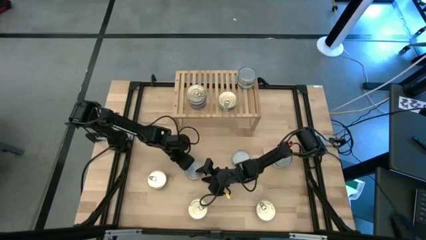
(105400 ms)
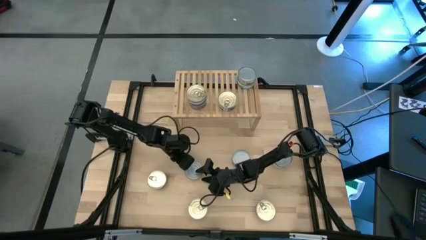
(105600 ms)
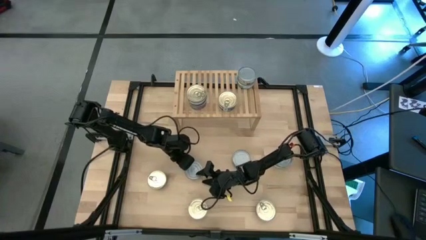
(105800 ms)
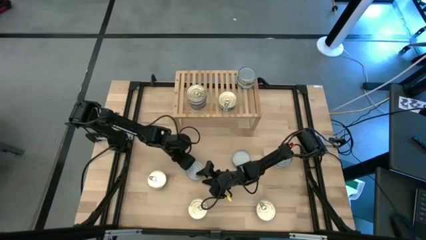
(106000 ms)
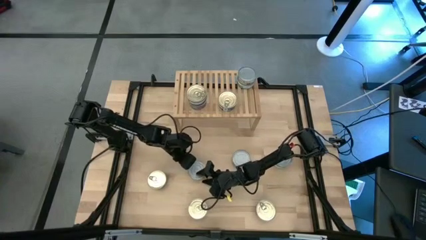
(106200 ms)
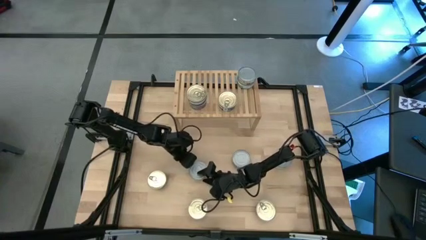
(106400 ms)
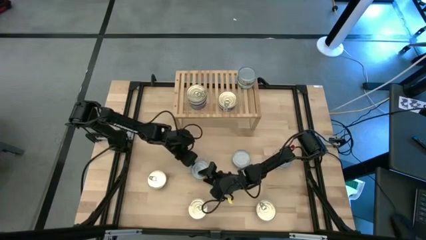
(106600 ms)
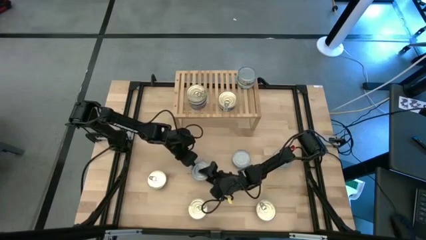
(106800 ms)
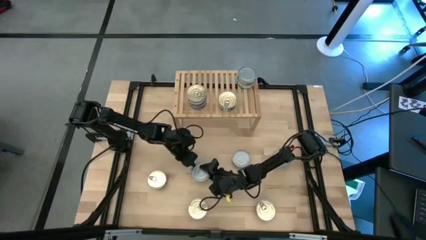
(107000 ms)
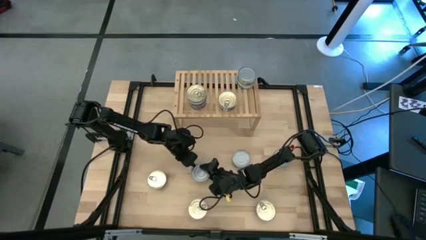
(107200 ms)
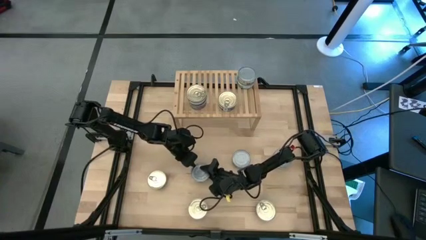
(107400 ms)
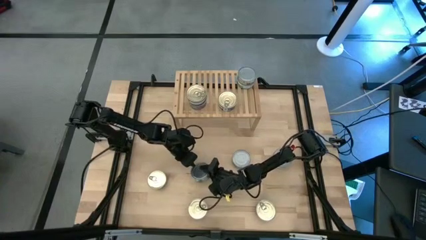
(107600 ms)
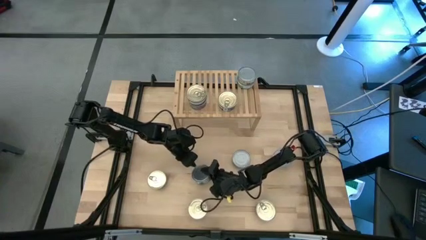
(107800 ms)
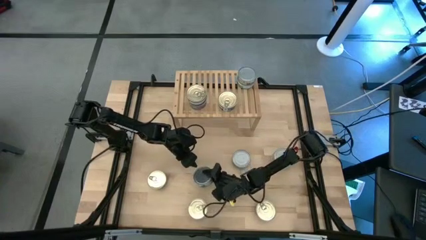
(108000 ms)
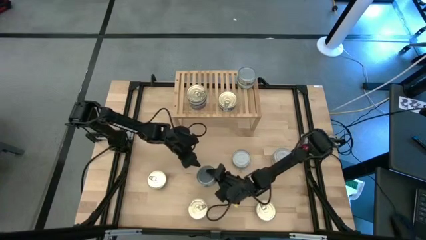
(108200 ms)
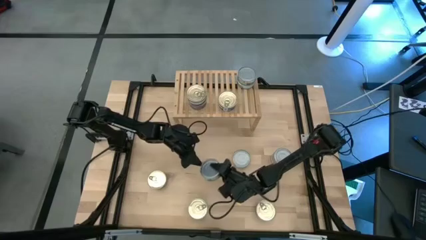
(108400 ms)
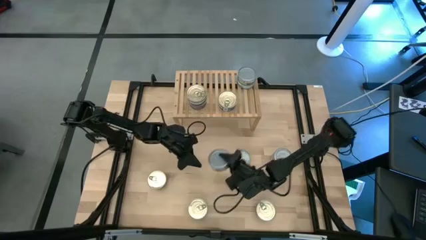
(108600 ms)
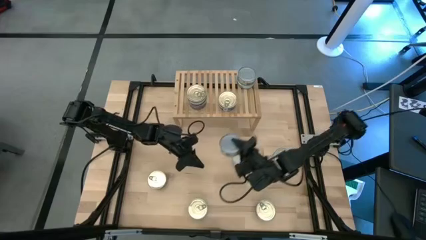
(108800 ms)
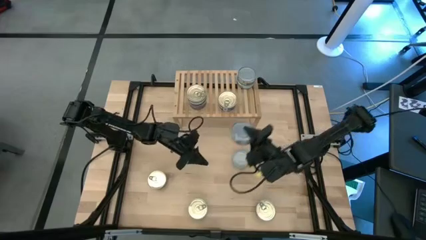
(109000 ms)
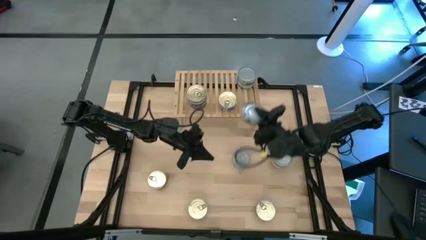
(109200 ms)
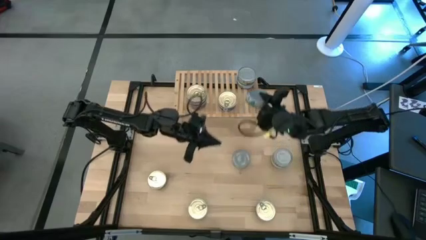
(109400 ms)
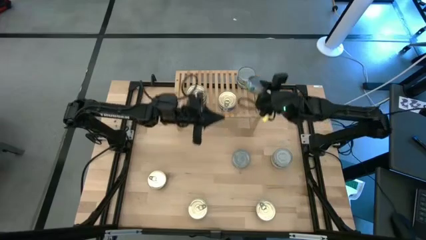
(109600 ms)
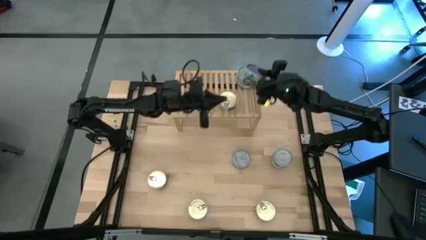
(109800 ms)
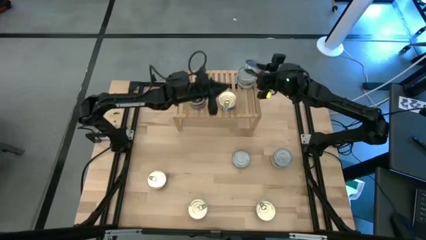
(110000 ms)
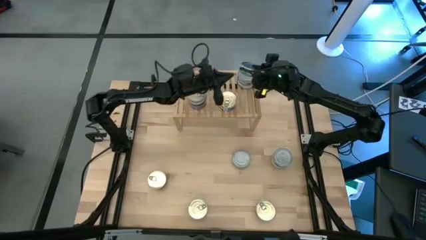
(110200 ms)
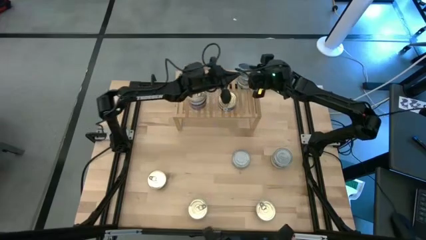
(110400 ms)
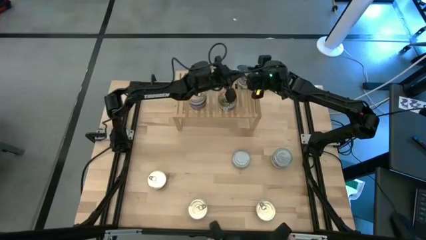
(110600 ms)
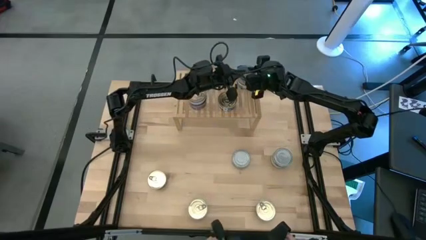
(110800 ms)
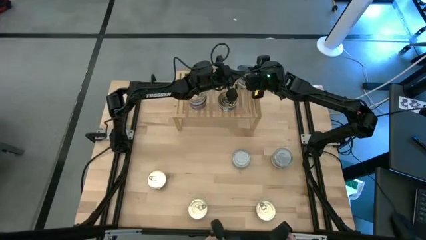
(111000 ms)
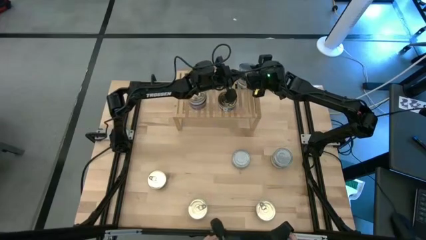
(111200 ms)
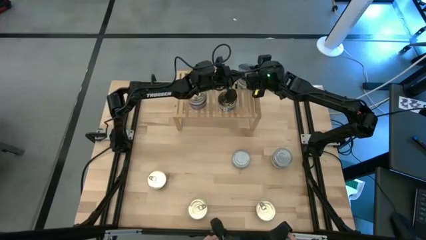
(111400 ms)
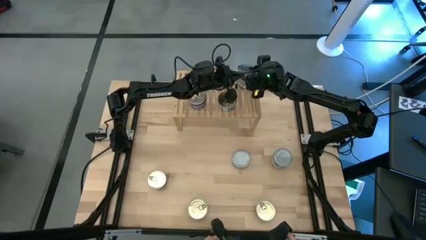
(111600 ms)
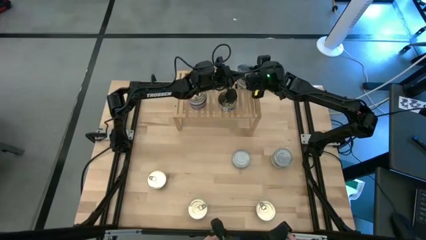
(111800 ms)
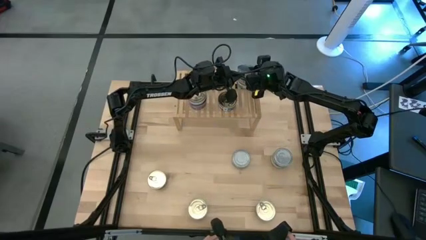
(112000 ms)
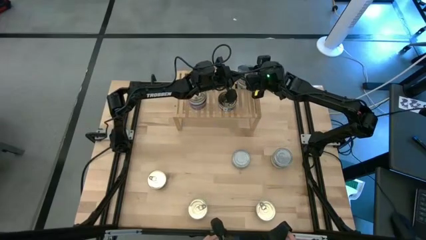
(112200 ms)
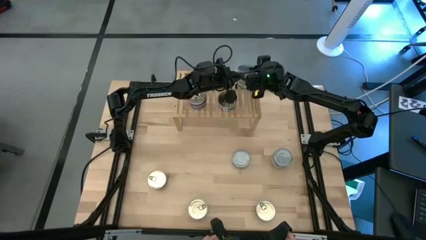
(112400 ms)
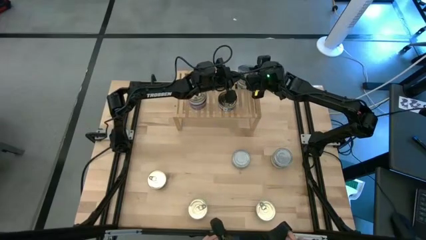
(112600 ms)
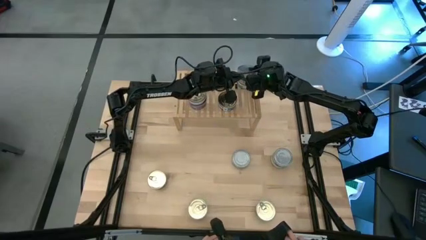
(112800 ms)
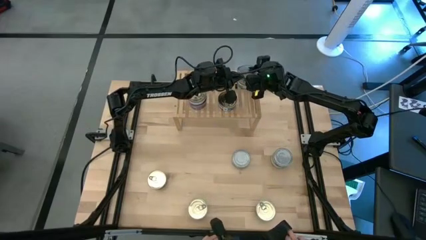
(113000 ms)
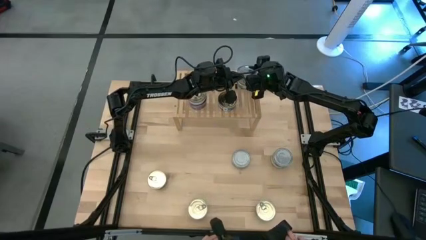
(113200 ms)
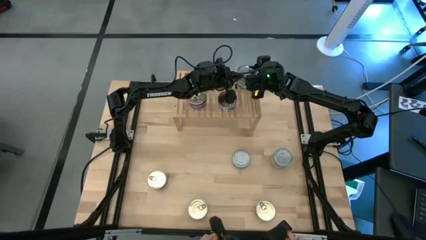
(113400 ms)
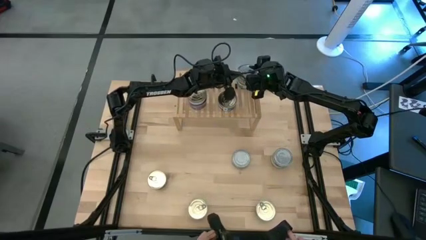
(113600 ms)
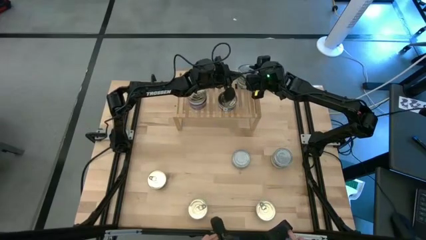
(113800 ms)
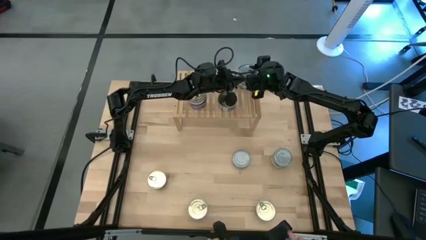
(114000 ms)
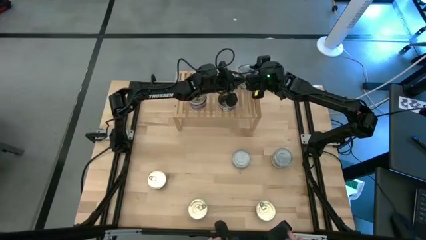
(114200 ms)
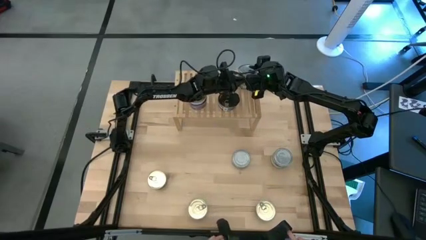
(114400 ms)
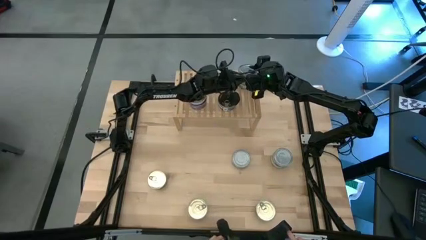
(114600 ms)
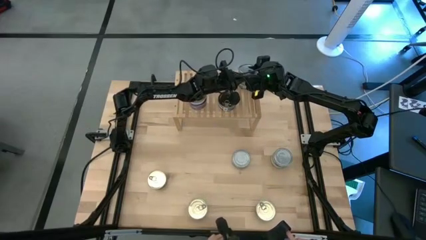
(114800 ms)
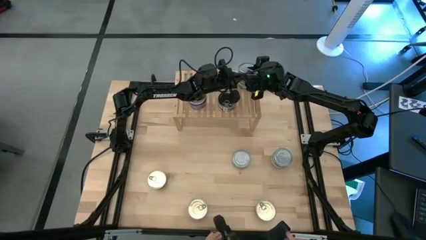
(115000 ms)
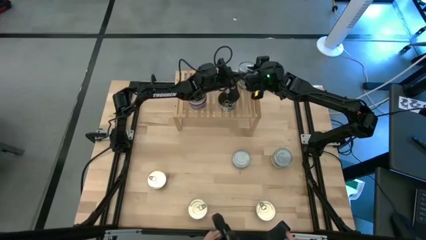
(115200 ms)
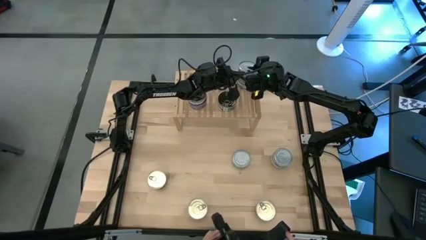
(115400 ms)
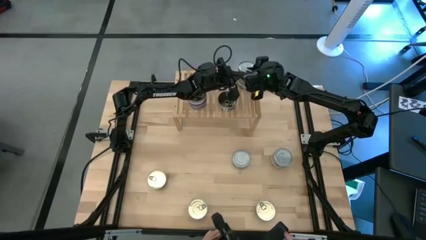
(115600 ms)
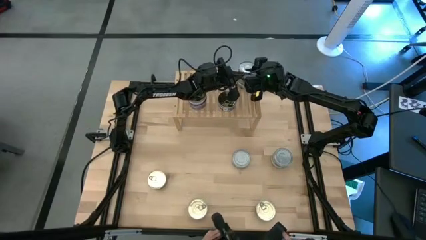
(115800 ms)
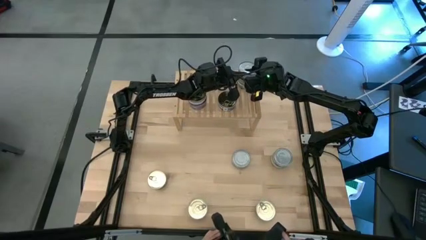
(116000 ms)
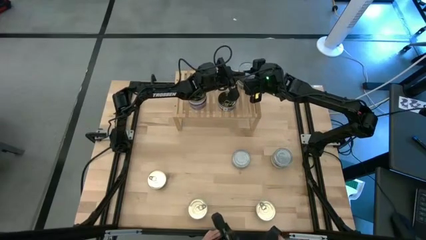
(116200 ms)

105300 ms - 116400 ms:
Task: Stack canned seafood by type on shelf
Stack the green tuna can on top of the green tuna can on the shelf
